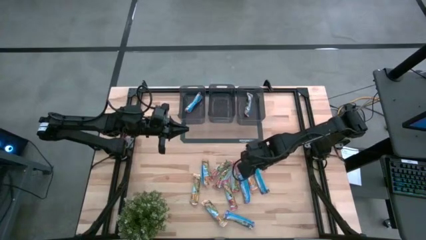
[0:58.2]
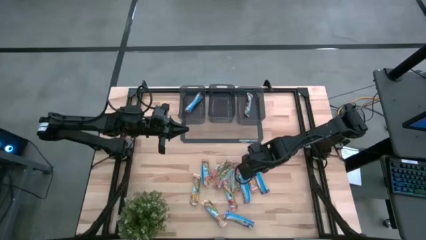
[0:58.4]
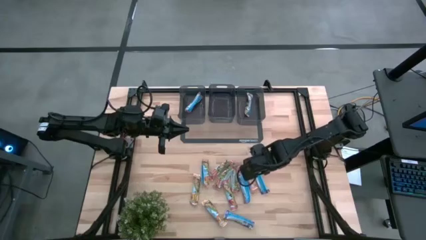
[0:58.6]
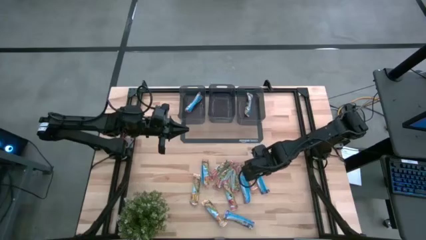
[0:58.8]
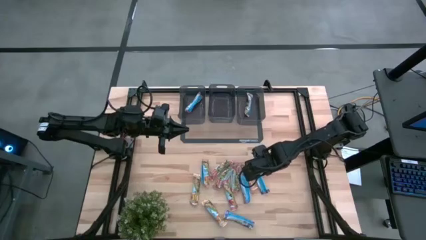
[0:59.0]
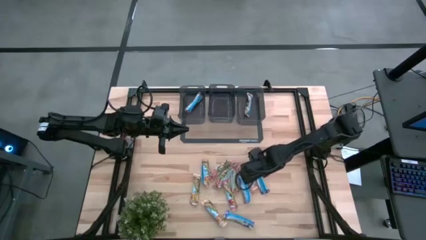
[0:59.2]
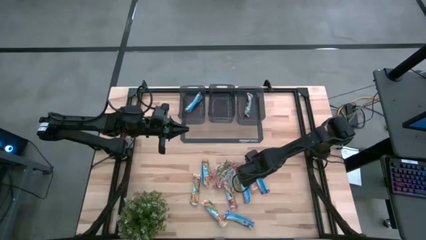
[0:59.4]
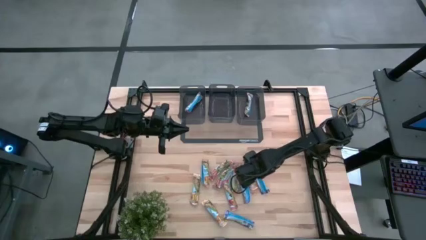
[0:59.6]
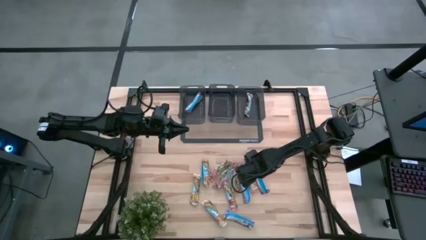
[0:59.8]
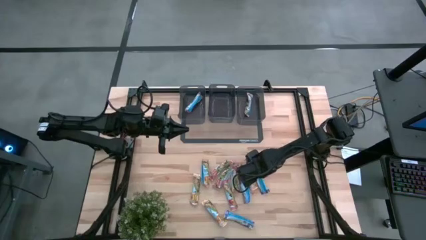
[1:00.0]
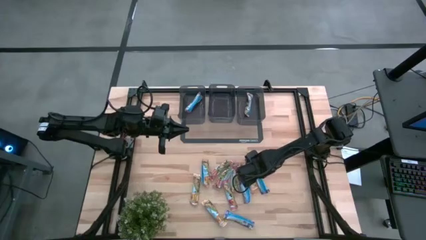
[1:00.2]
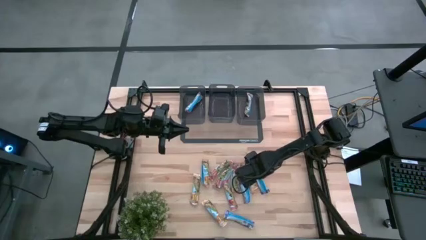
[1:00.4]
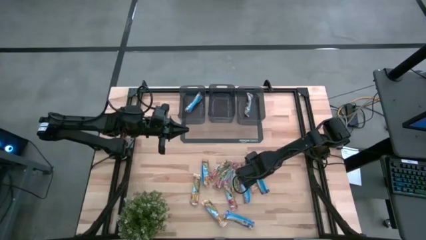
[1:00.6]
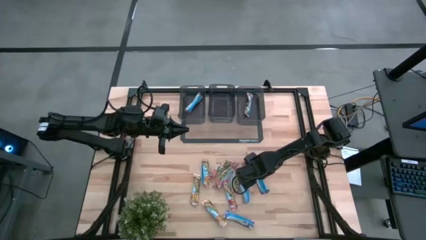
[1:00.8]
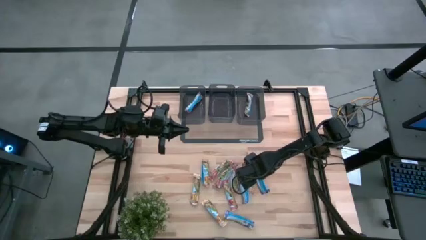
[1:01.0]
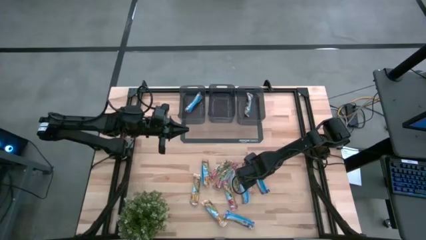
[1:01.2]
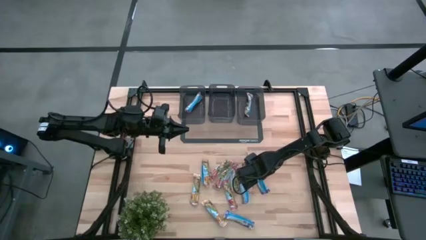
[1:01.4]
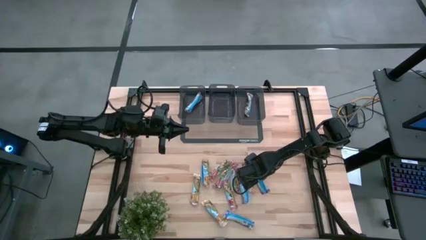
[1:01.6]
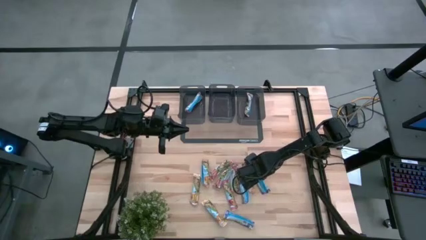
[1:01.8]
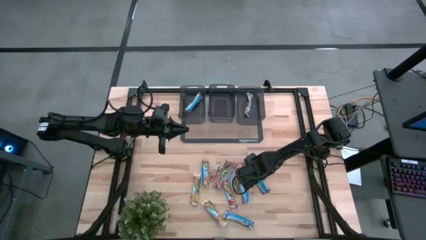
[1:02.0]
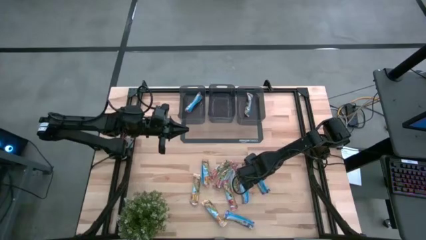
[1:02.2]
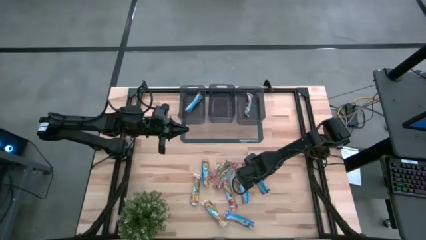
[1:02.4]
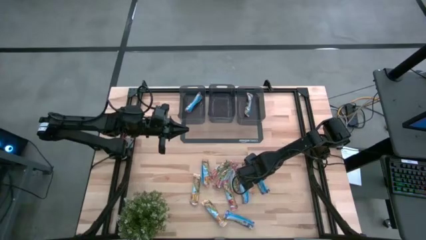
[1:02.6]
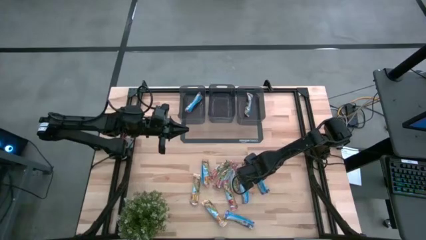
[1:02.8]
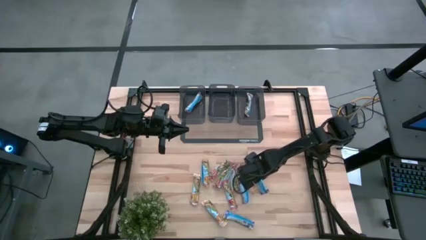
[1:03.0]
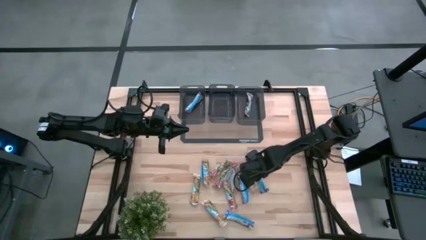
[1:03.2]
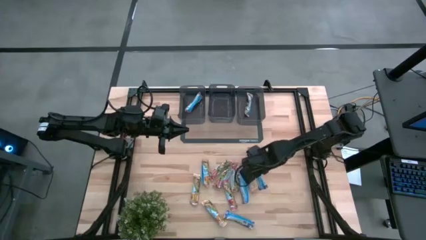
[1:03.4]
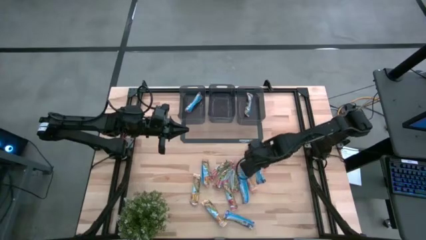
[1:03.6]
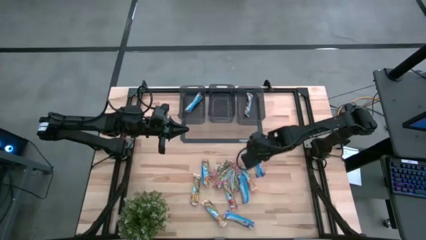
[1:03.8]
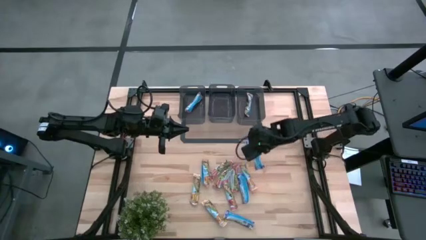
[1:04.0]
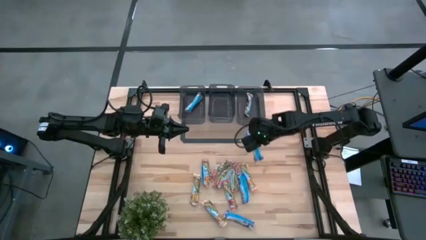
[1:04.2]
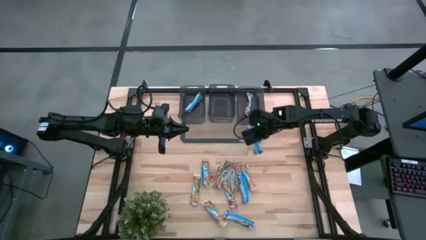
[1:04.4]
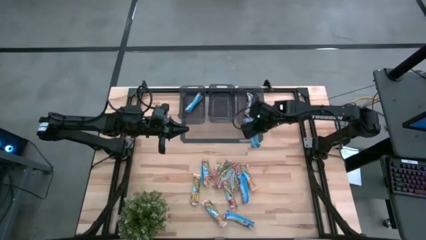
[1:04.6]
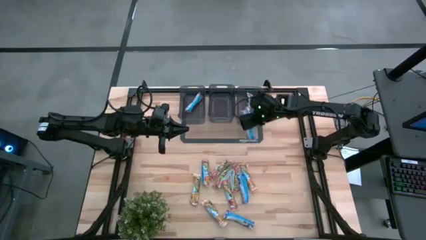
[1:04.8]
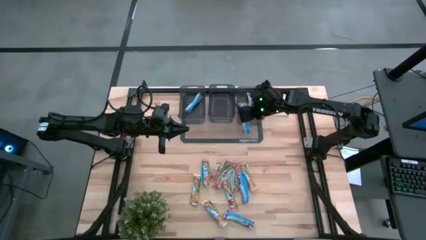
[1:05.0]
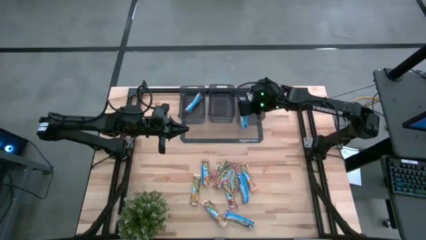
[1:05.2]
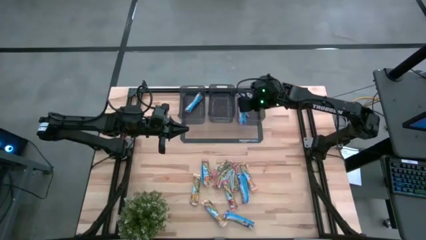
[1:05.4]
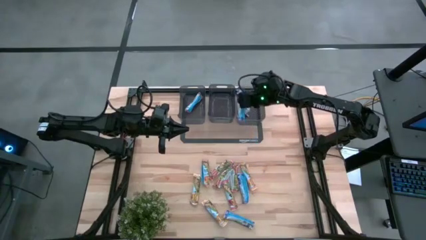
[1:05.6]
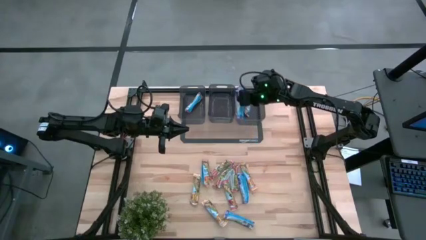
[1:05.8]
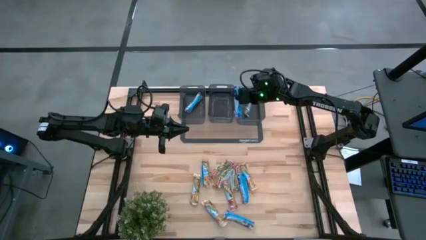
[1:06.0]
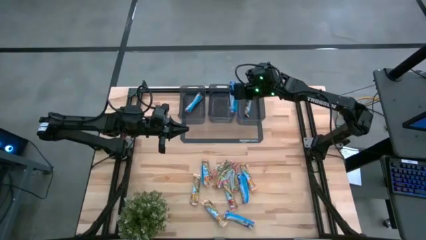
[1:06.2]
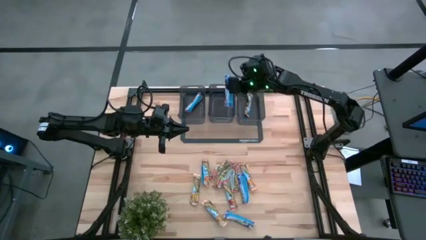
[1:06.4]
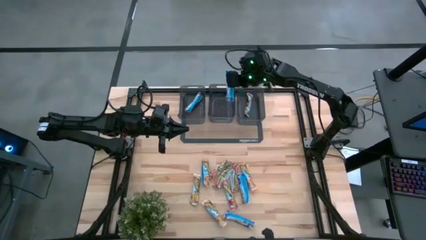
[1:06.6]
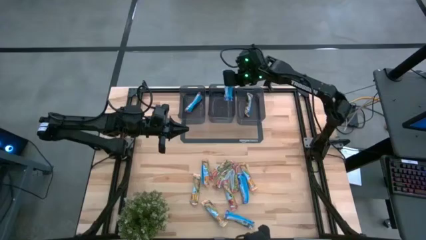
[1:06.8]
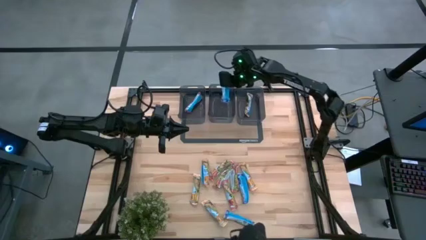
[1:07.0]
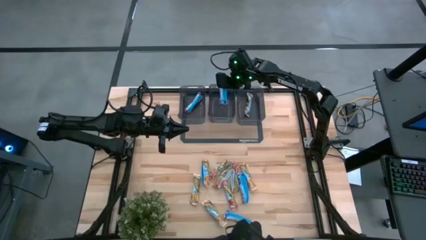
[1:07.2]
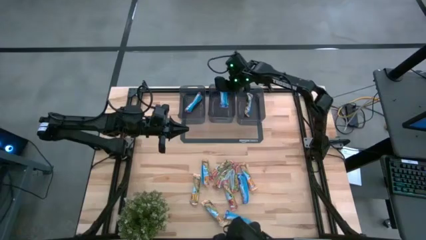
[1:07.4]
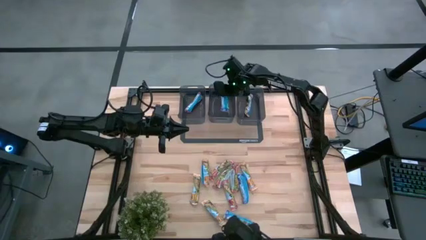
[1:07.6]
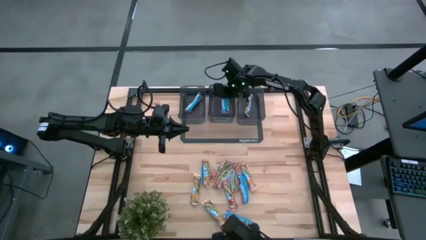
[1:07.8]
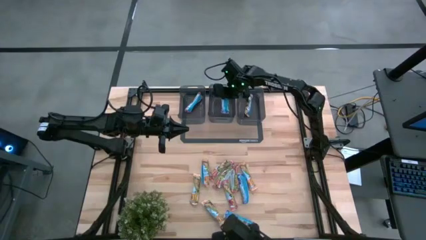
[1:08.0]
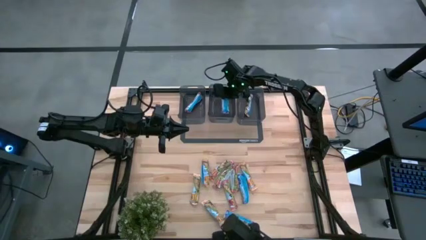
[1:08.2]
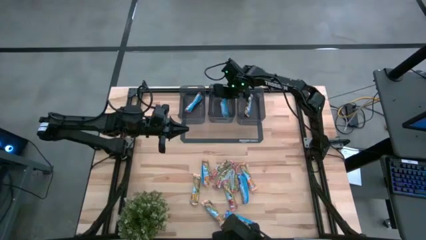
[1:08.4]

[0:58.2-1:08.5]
Task: Pick and place Granola Bars by type
Put the blue granola bar into the center black bin

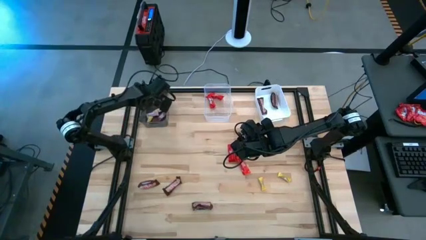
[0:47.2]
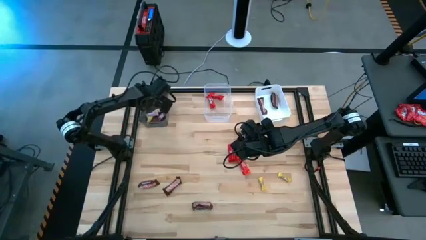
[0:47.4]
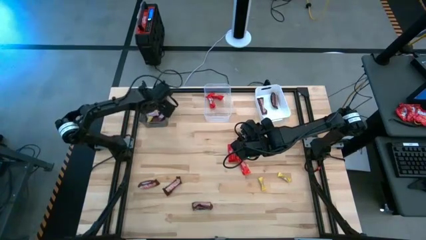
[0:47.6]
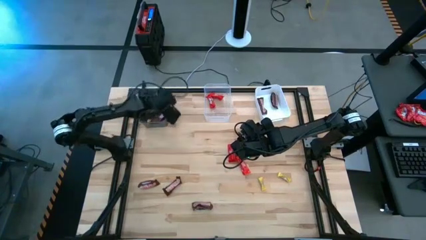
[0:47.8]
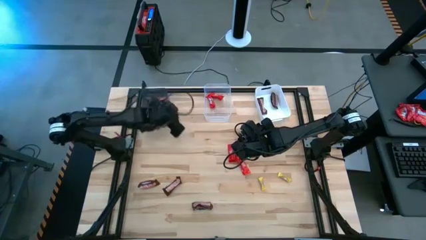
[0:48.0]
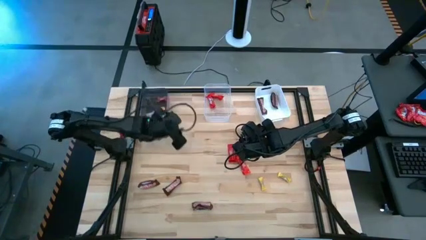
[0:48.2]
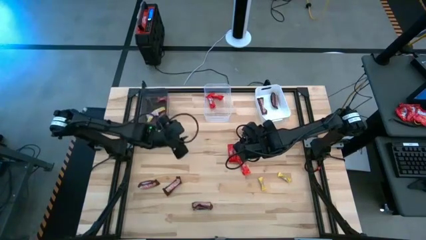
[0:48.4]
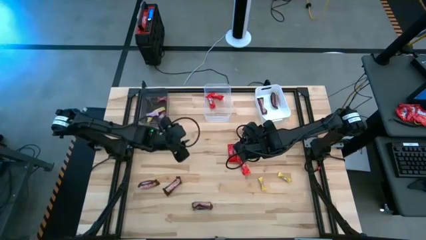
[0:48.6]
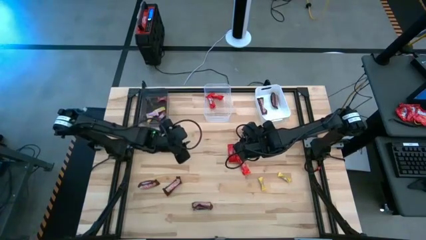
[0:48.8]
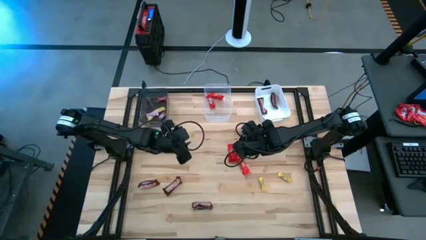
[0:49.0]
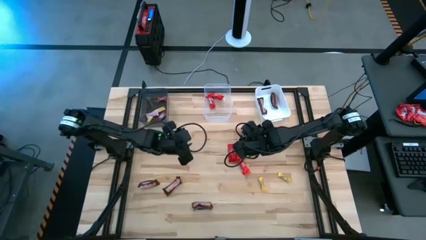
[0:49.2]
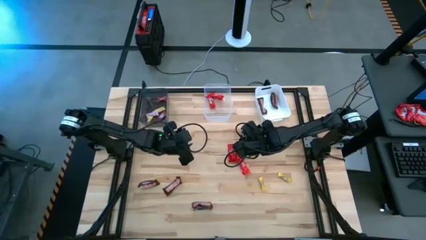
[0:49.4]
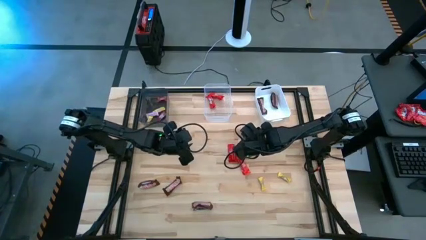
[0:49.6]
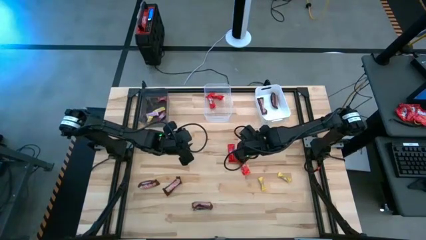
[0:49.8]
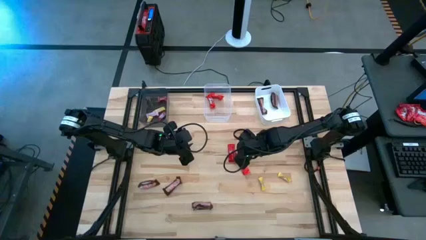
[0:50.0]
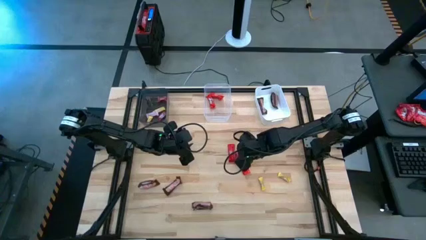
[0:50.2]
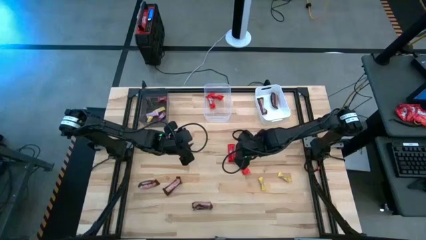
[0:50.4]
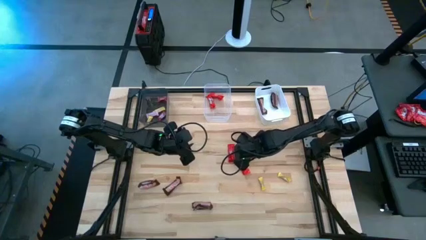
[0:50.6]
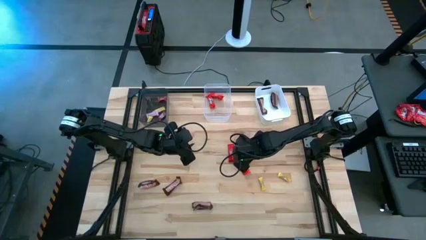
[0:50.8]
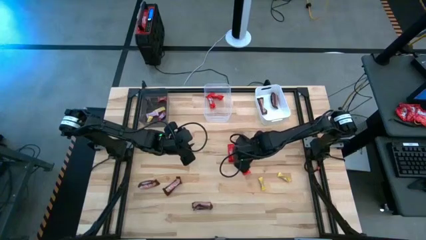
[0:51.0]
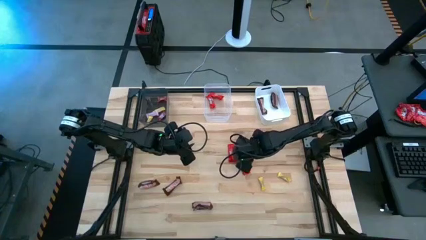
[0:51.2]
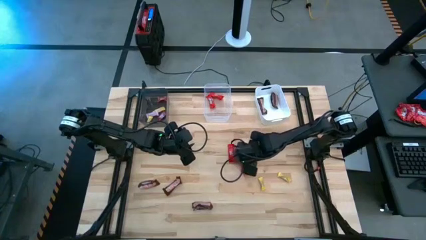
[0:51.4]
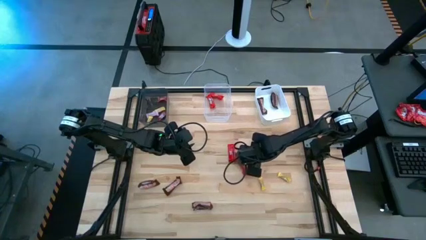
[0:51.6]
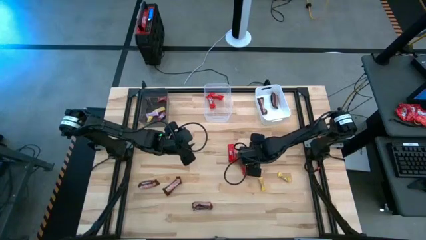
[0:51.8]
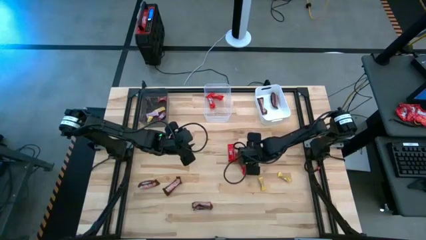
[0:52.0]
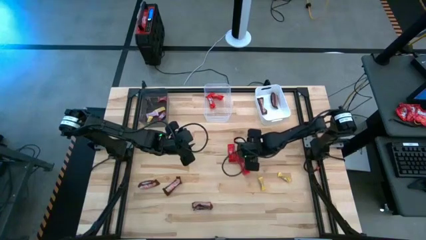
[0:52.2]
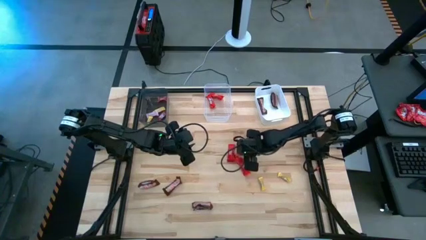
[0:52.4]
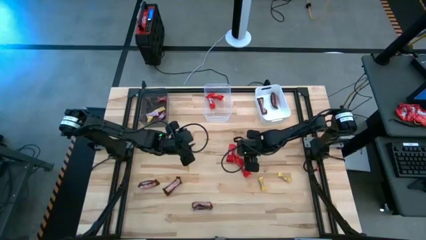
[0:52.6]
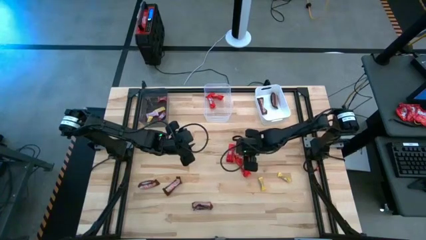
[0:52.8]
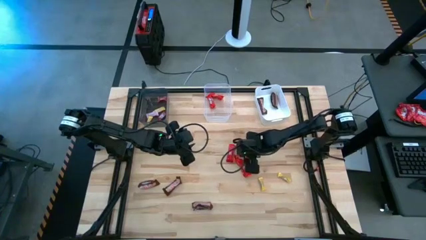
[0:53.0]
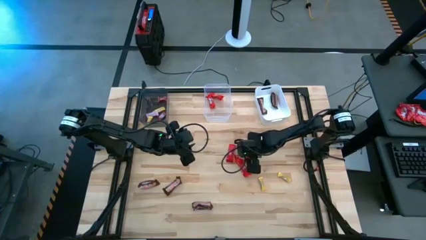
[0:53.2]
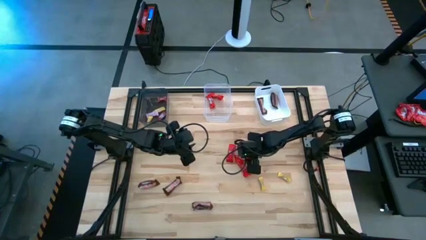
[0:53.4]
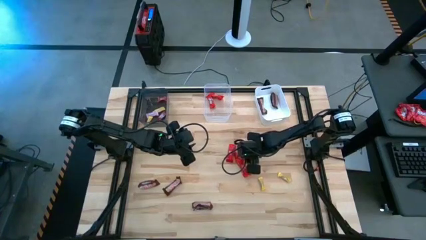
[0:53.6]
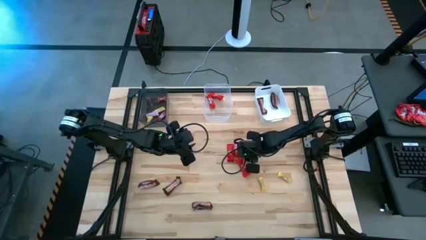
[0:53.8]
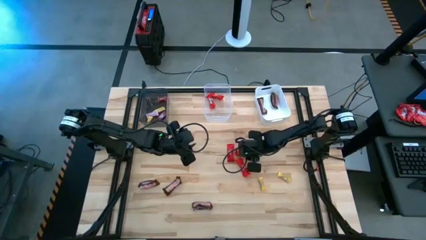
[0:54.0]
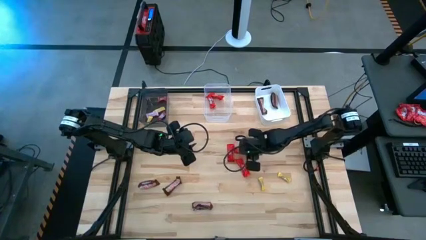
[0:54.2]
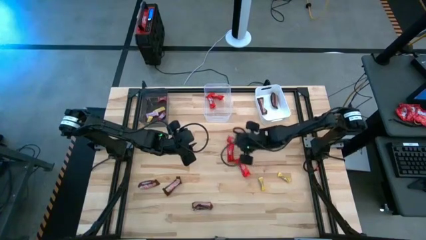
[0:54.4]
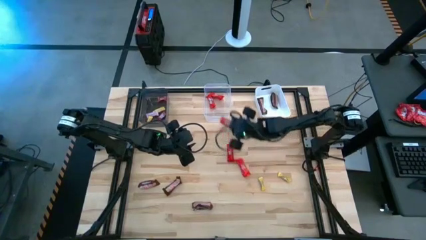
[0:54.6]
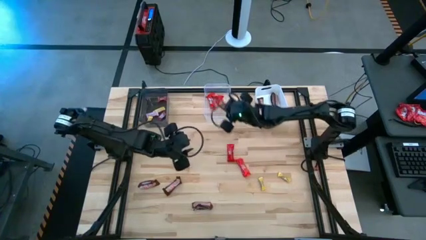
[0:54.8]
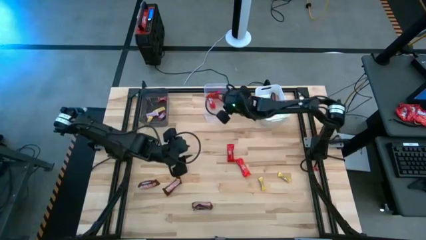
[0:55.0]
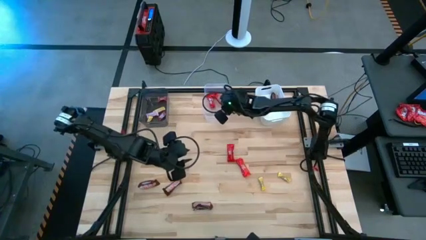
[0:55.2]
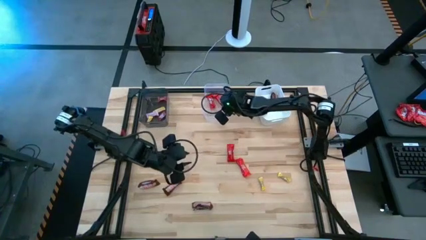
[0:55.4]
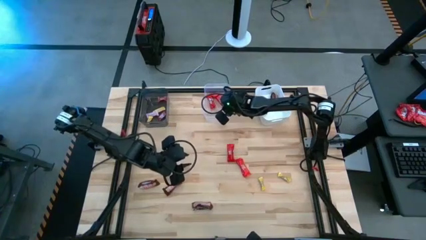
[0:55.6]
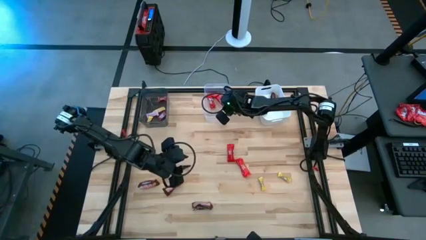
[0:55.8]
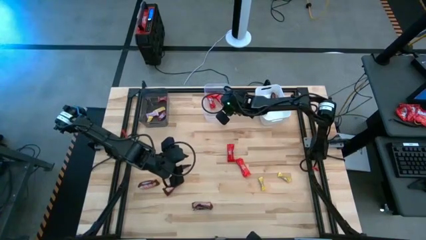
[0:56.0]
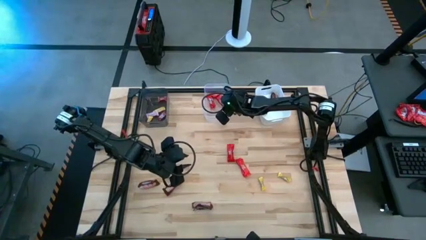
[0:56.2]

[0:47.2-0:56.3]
Task: Sort candy by brand, put in halloween buckets
Put the red chocolate bar into the transparent bin
